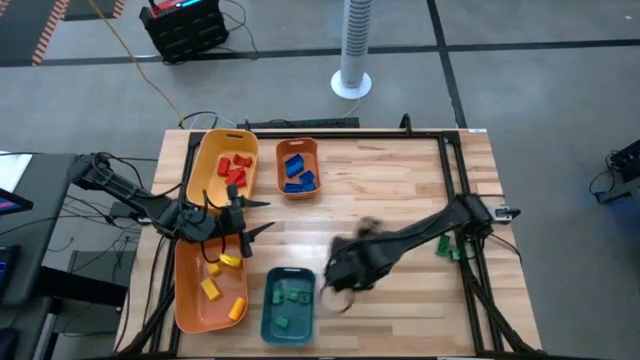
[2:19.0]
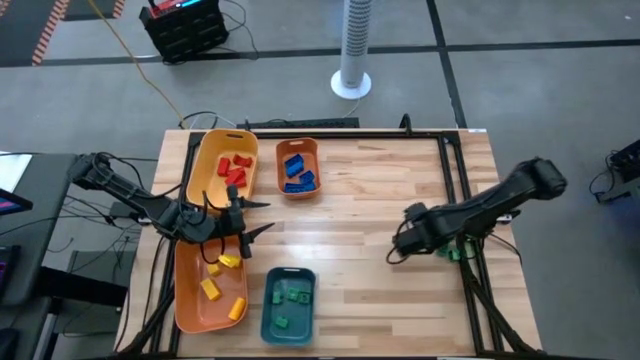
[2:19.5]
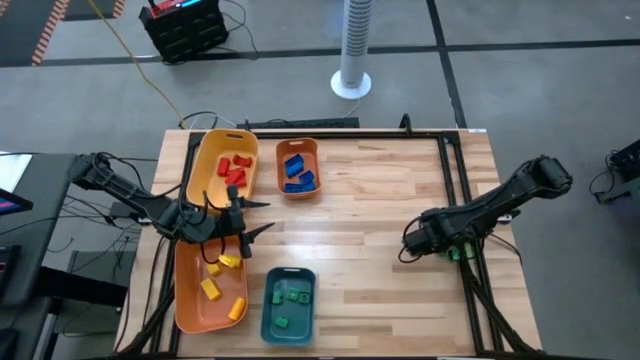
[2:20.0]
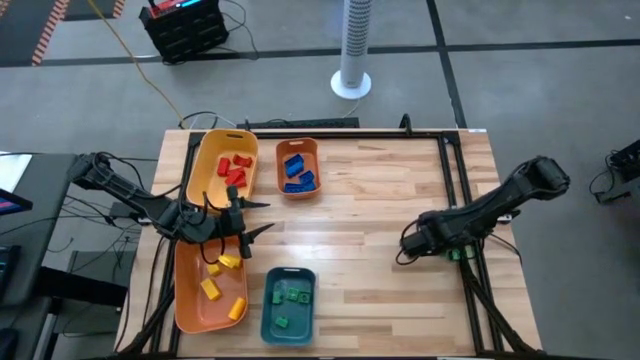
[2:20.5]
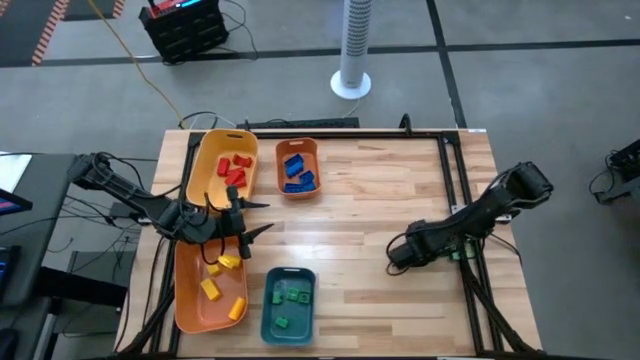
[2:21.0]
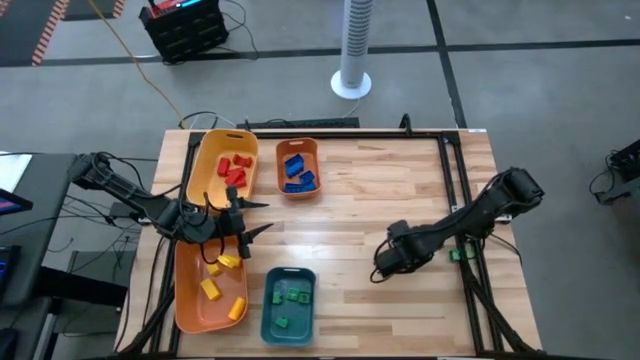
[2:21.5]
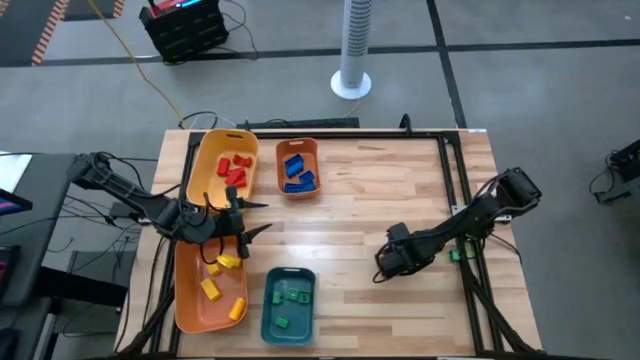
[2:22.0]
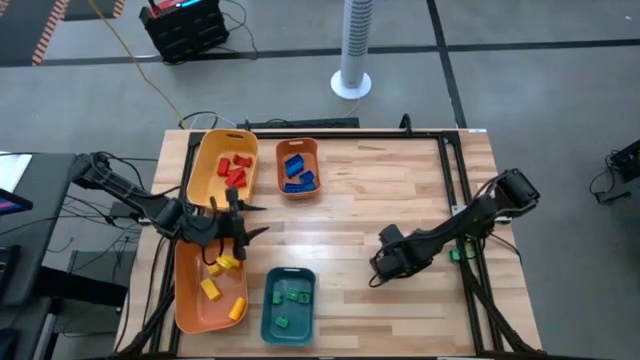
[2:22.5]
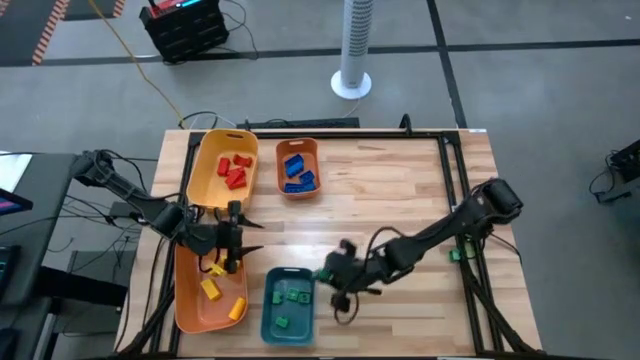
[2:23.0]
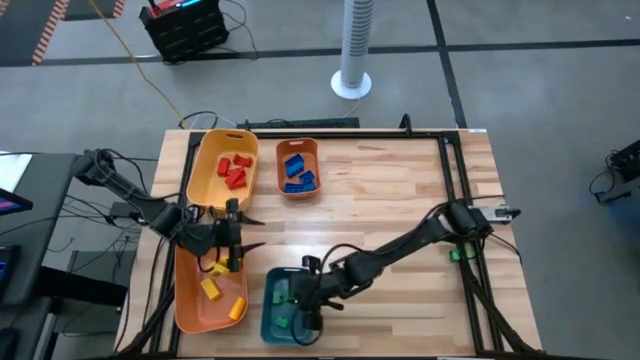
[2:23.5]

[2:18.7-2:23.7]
Task: Sort blocks
Put the green game piece into the blue bin

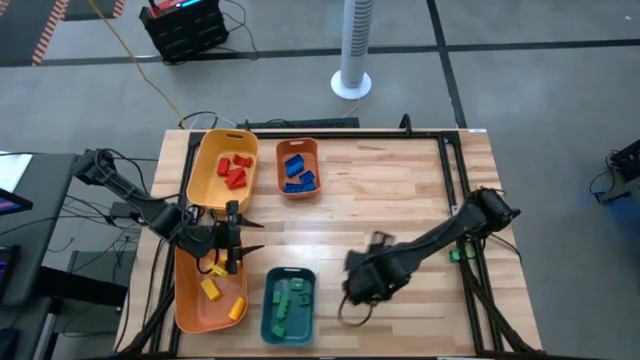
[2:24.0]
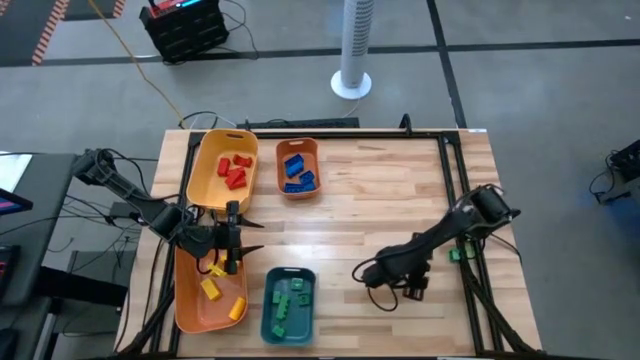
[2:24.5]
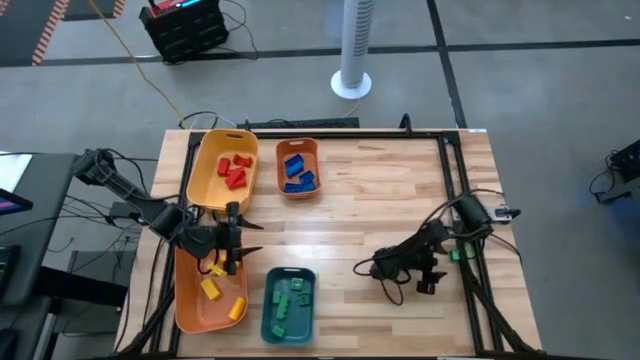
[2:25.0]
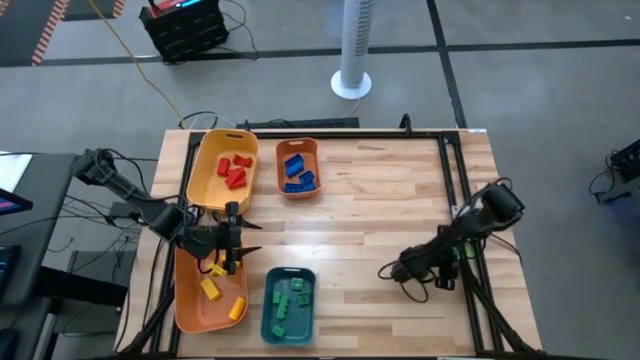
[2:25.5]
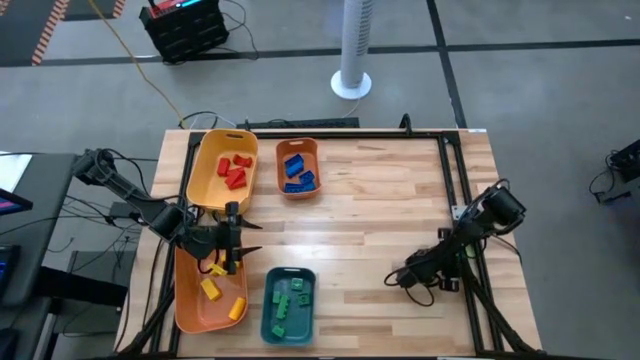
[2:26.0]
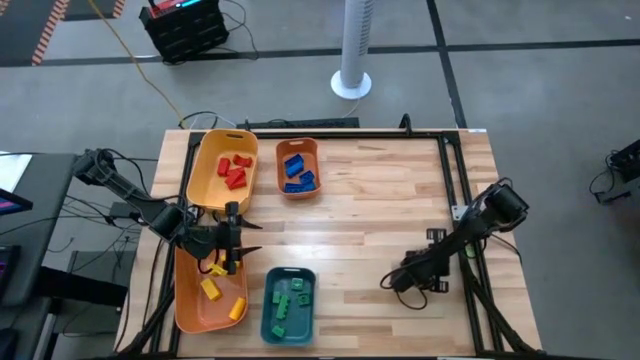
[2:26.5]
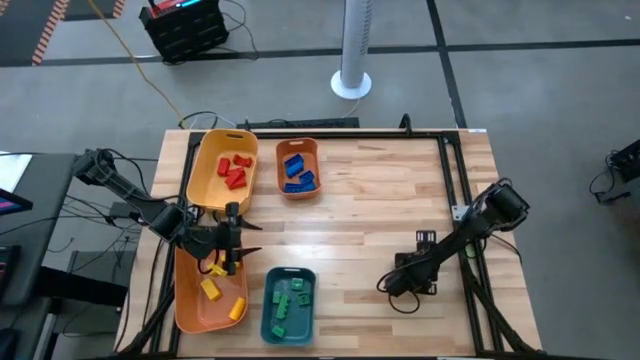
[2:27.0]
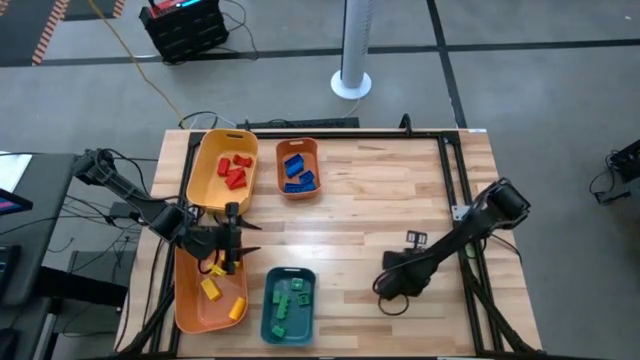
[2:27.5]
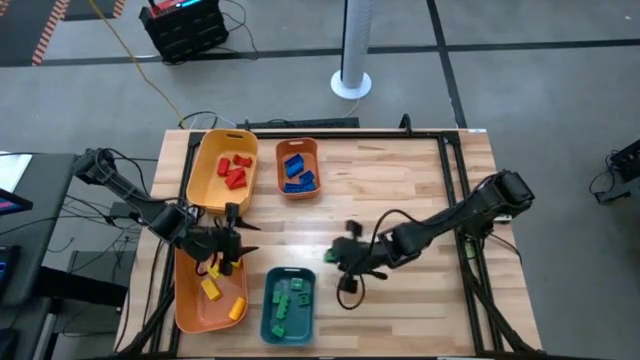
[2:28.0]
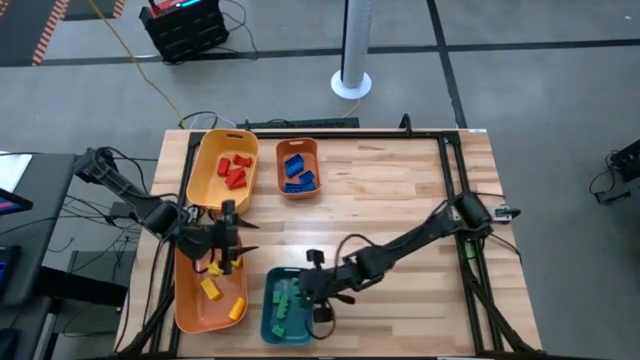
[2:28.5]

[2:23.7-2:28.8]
Put the green game piece into the blue bin

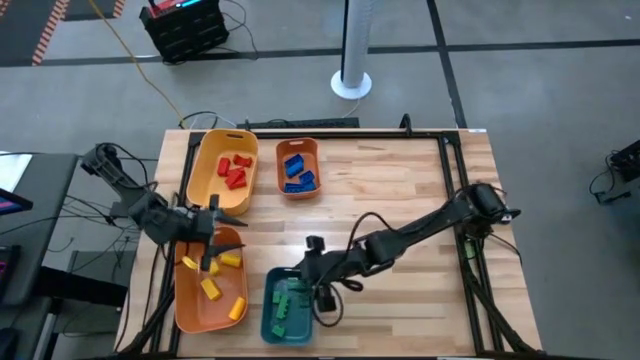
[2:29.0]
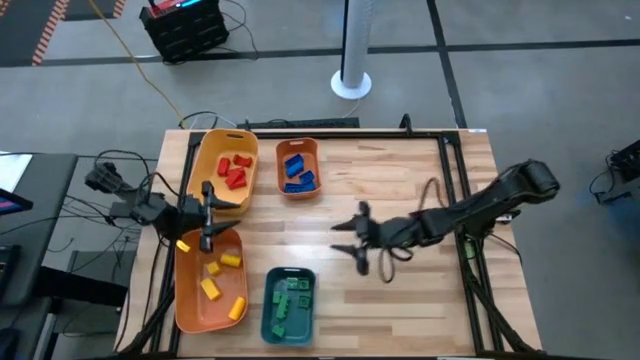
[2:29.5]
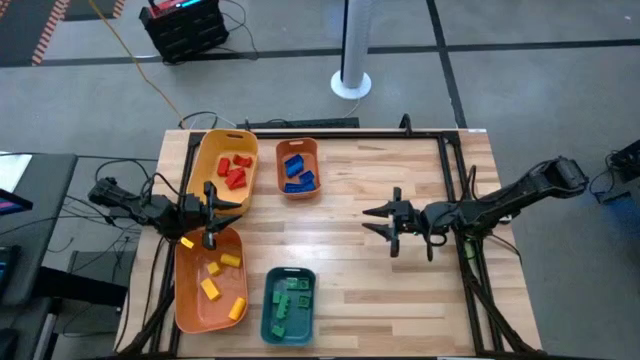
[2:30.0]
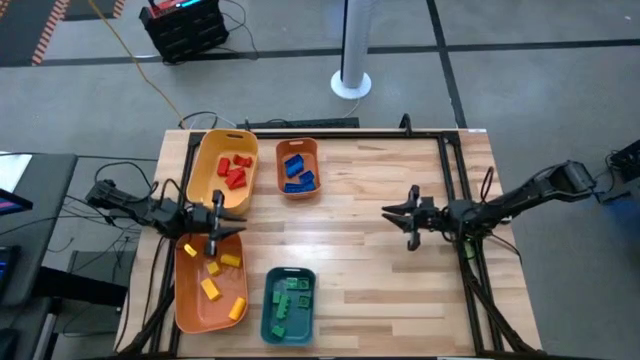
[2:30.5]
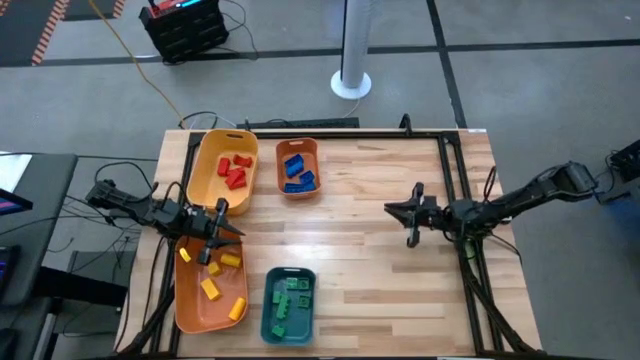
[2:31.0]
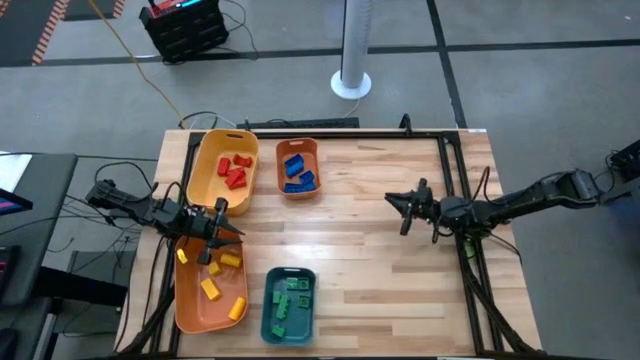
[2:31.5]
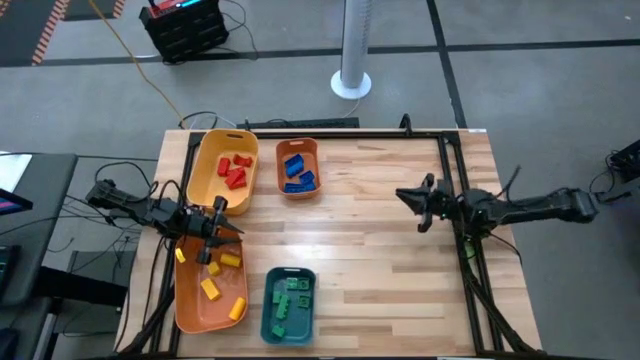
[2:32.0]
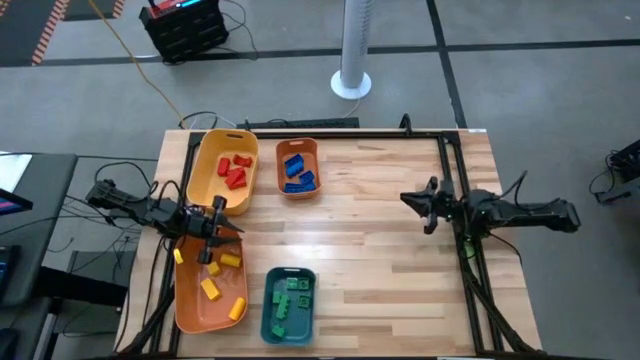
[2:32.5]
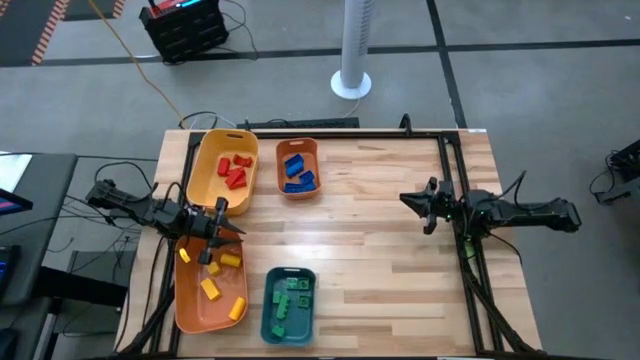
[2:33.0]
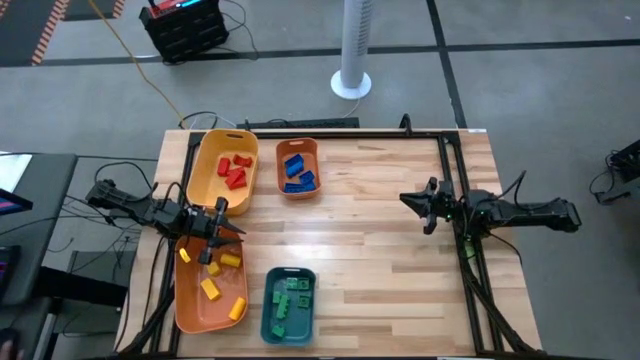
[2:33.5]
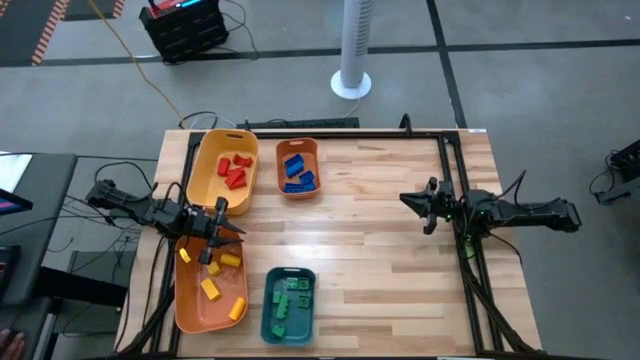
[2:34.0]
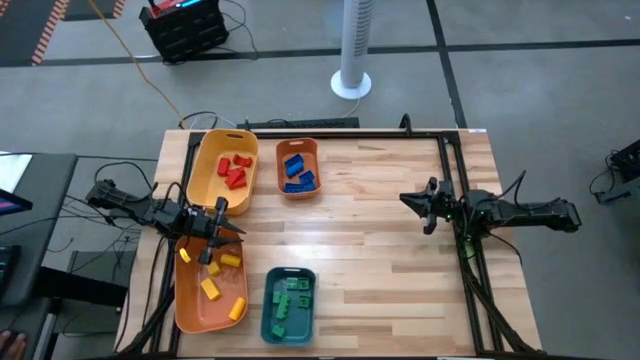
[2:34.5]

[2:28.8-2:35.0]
Return to Home Position

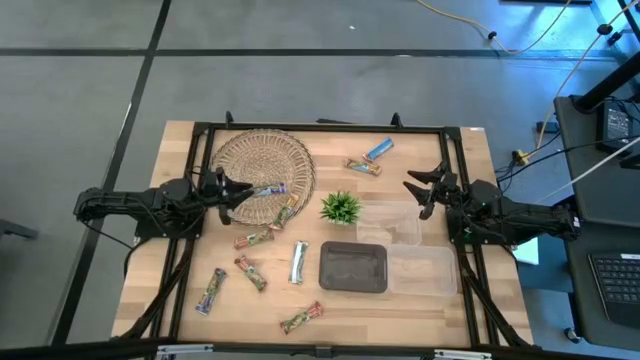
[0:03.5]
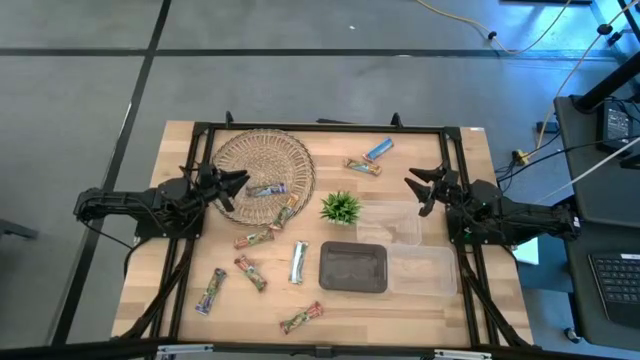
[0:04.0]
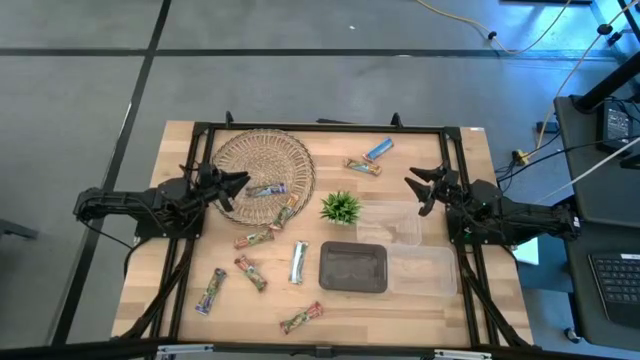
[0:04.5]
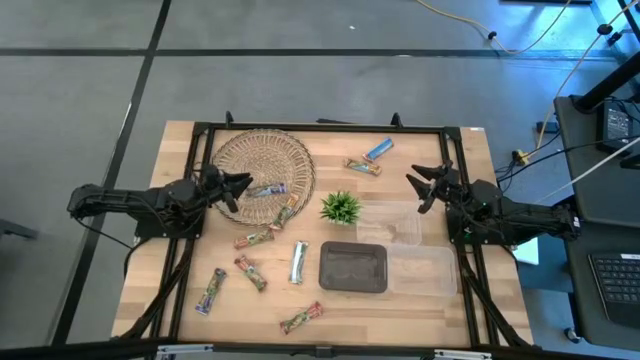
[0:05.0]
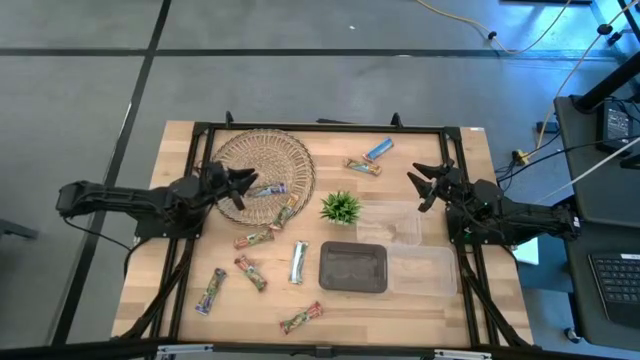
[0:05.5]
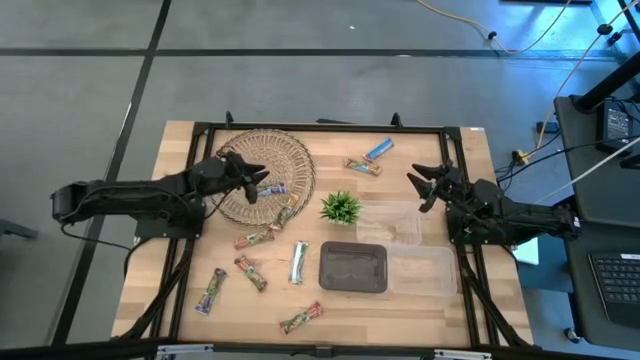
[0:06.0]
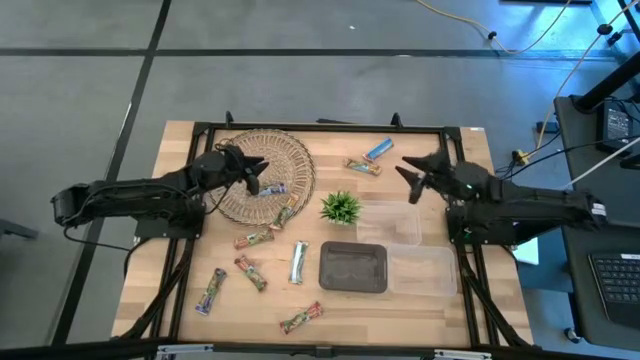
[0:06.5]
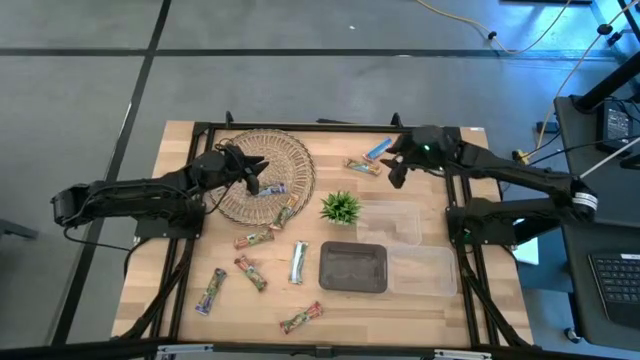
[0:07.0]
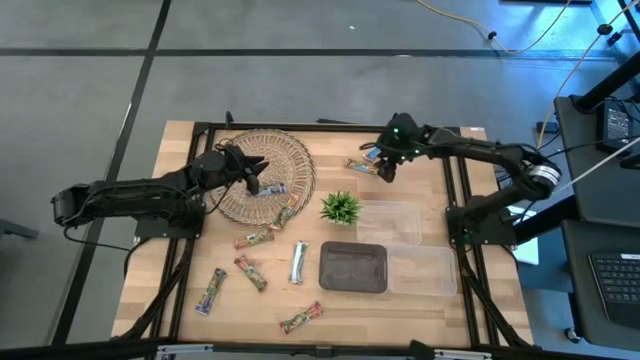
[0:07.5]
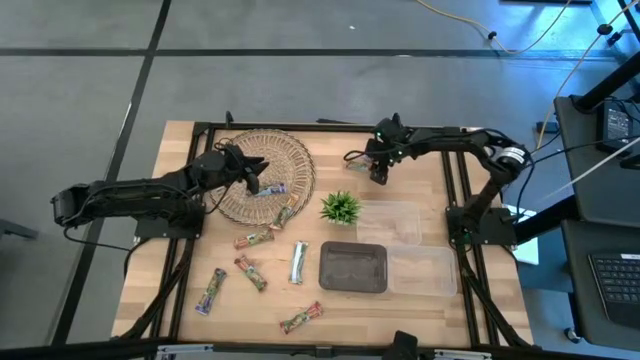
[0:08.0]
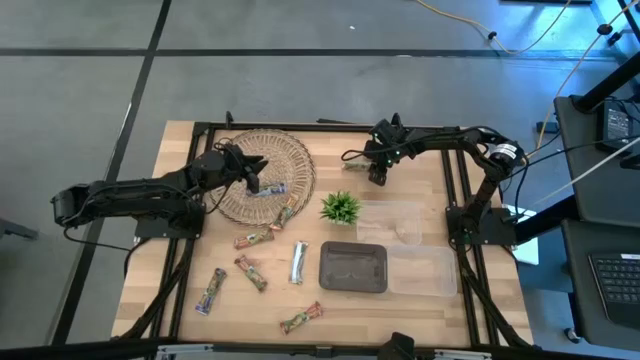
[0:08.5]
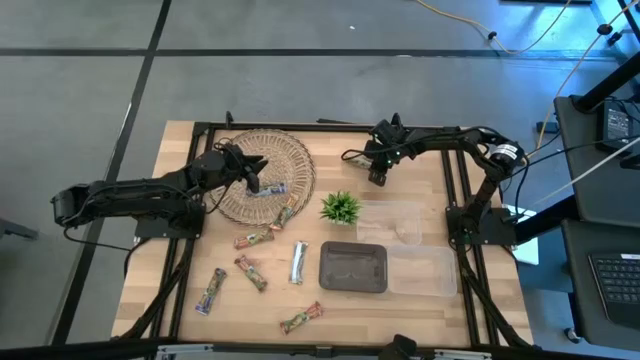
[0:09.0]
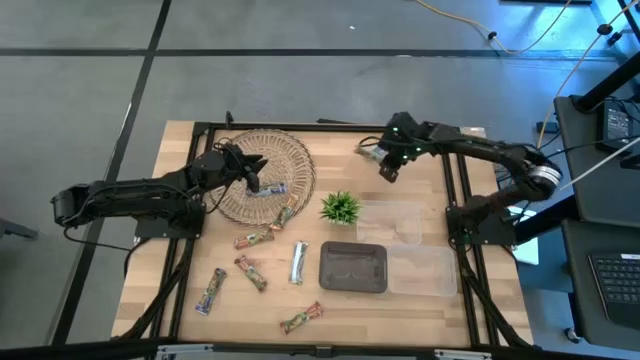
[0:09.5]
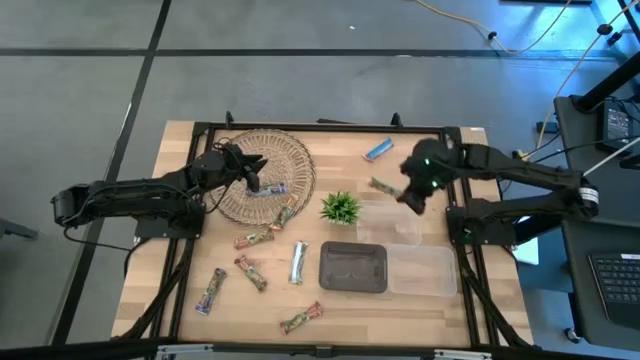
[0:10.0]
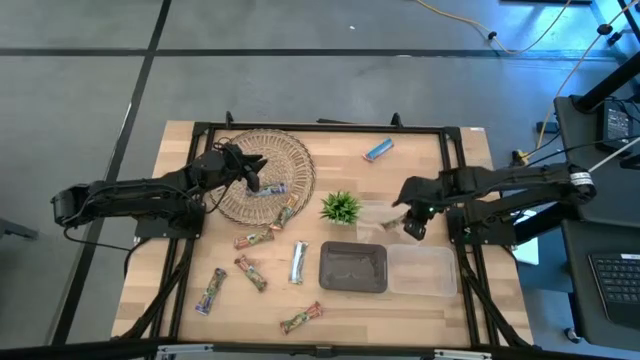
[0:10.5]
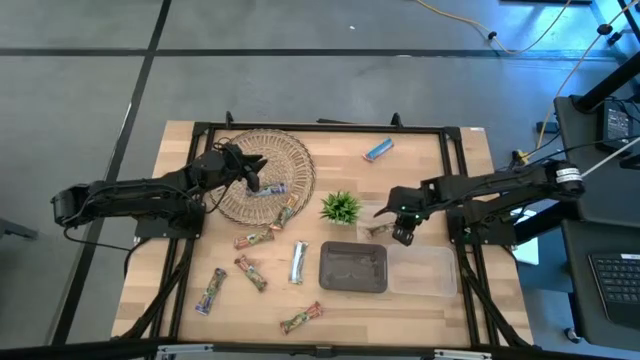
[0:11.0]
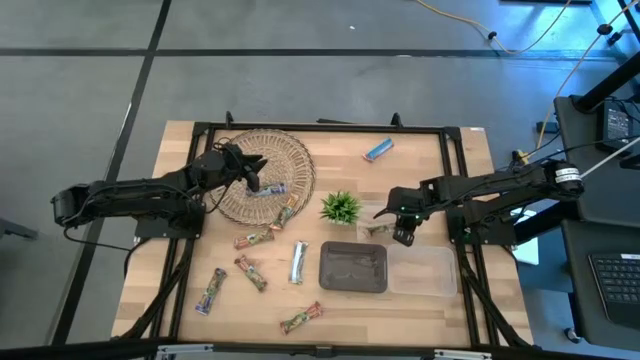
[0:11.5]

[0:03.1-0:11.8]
Task: Pick and place Granola Bars by type
Put the orange granola bar into the top transparent bin
